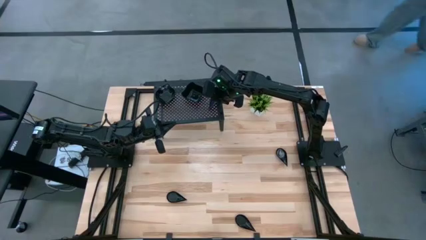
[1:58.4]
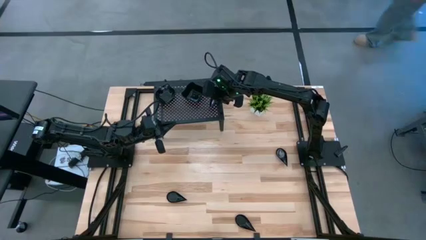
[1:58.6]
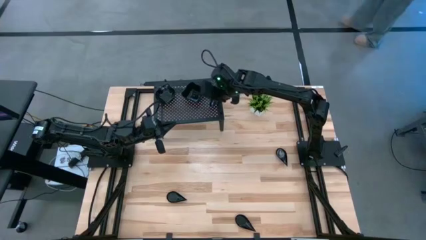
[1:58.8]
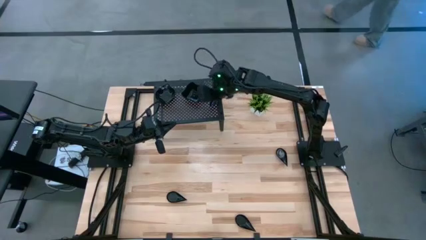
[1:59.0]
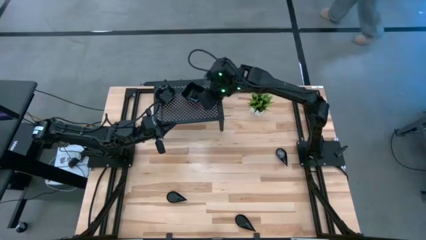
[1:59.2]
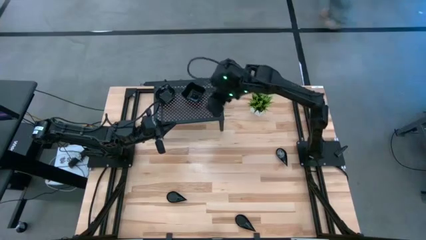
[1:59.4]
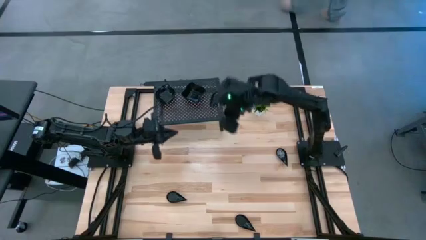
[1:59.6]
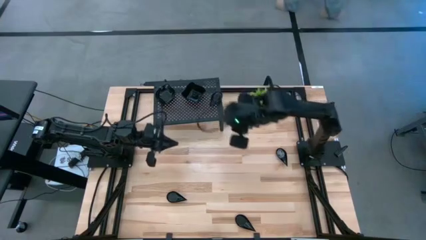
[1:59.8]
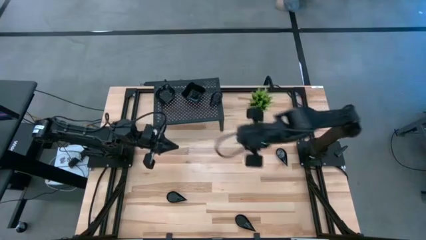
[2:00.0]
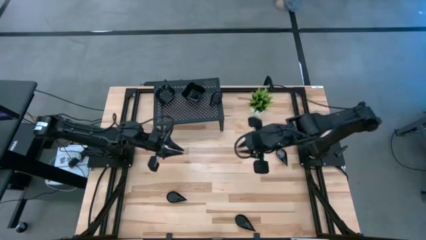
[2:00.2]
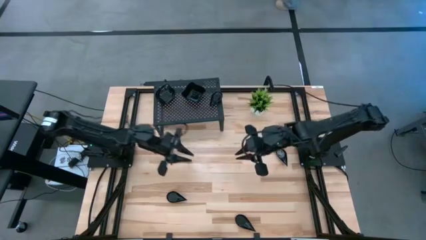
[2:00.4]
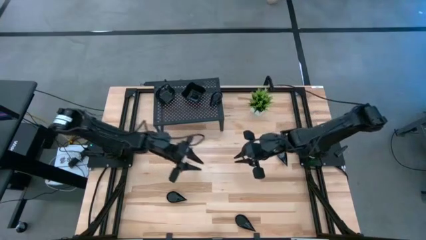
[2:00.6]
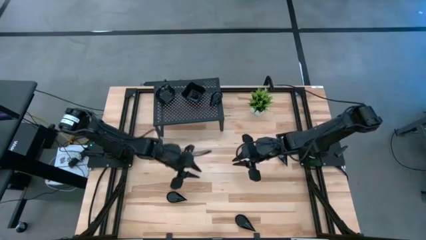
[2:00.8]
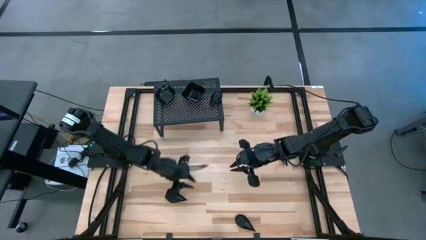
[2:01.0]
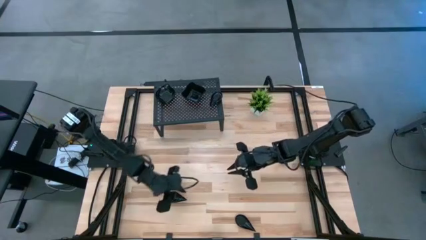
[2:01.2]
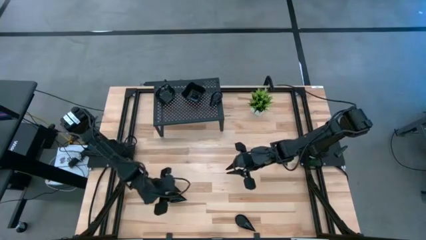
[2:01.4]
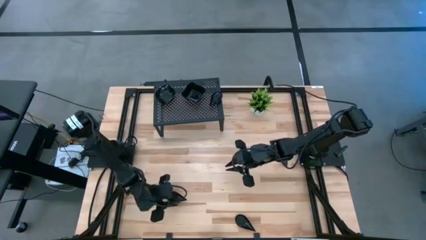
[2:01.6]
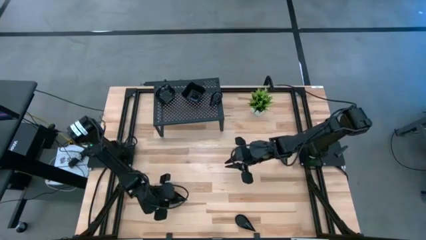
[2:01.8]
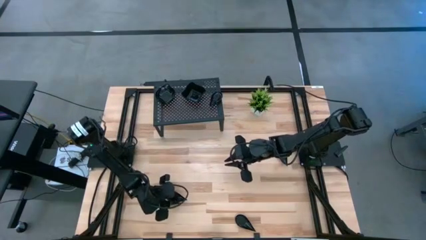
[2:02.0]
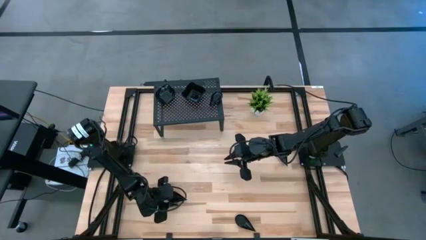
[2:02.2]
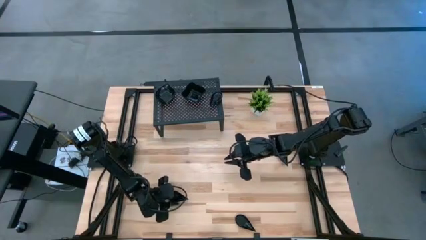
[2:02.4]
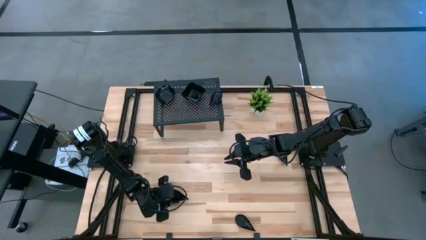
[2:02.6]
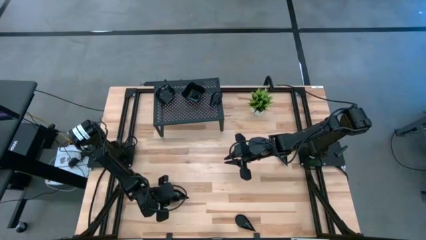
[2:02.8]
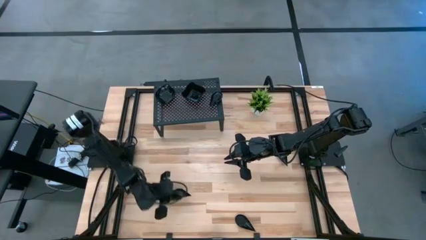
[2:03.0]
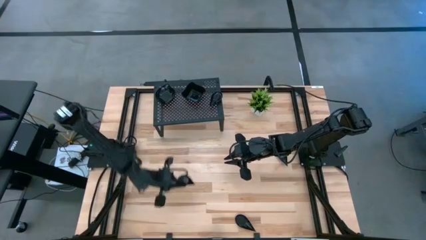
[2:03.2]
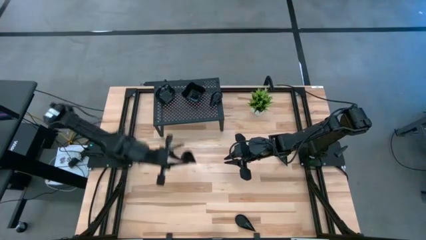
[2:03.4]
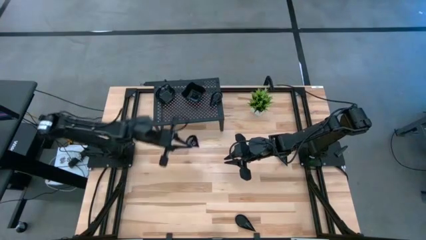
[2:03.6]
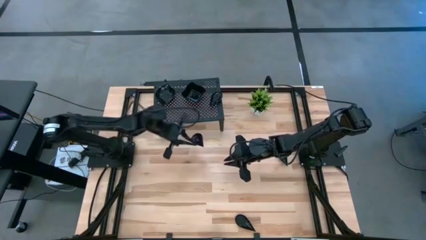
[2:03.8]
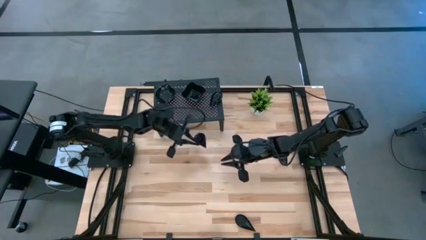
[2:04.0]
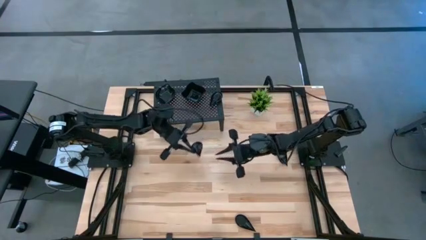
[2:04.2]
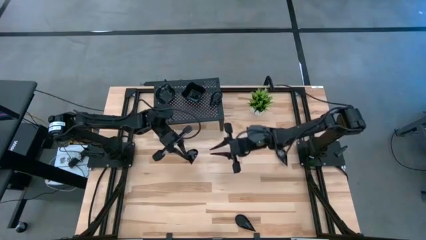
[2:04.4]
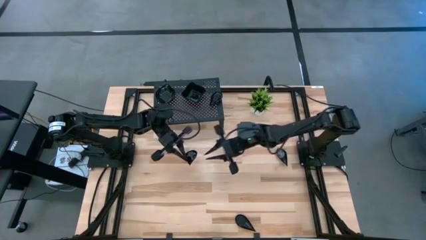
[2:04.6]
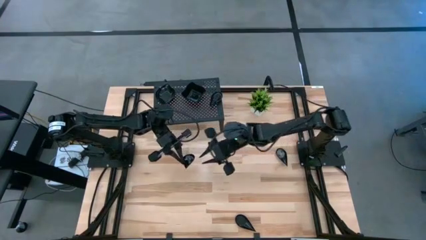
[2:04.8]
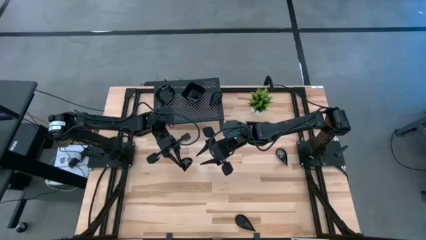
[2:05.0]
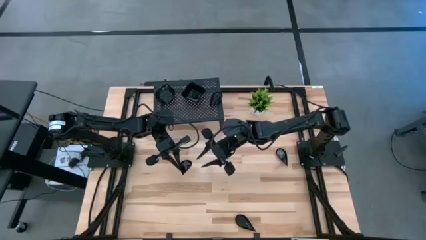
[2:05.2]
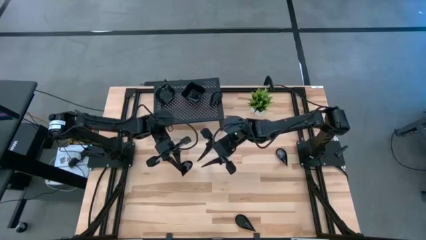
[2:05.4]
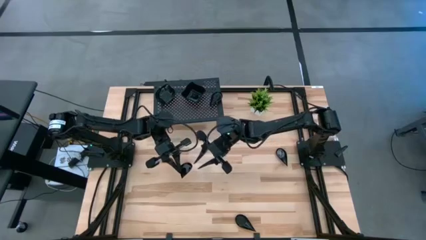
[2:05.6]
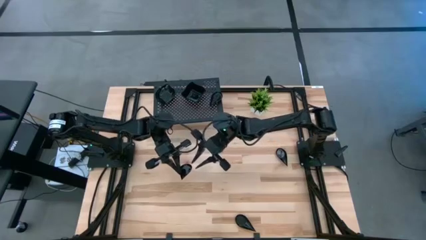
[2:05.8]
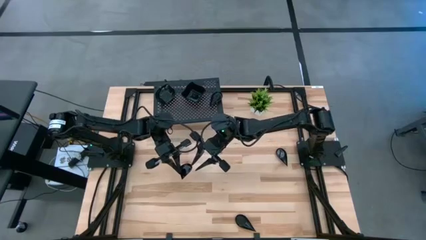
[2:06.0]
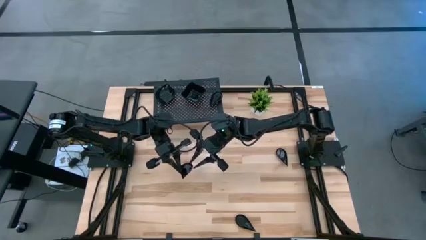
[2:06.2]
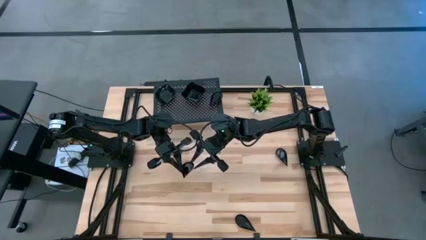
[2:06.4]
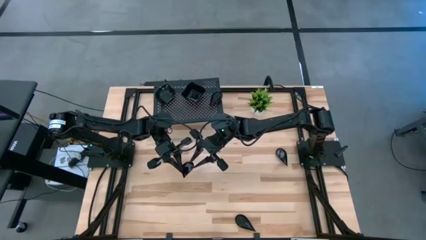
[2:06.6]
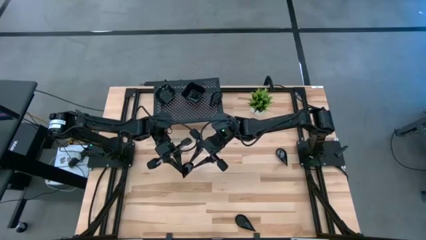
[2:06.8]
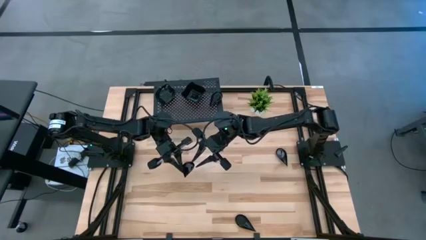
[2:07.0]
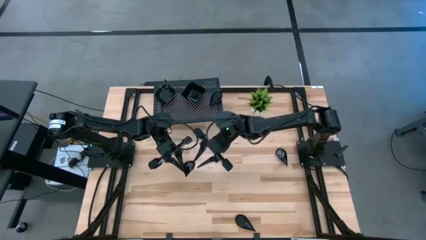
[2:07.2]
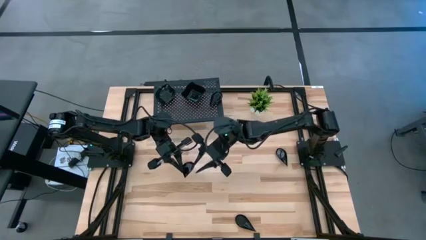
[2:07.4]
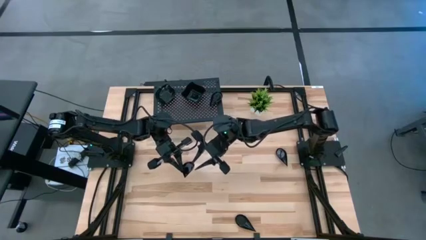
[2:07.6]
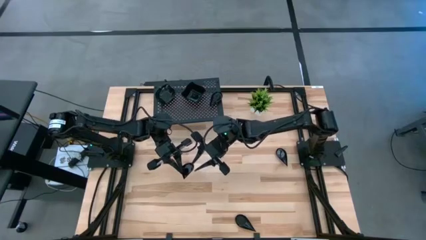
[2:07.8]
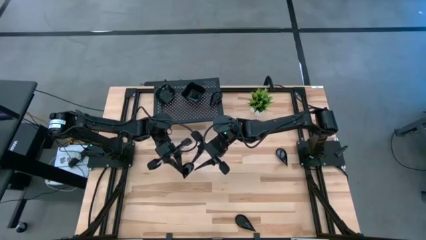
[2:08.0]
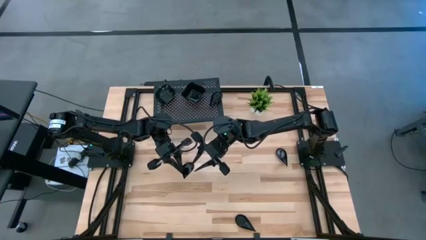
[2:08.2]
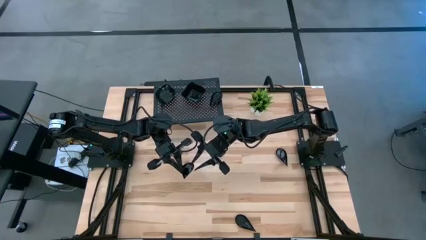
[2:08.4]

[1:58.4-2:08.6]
Task: Pick & Place Mini shaped plates
Stack the black drop shaped plate on the top of the black drop shaped plates on the shelf
